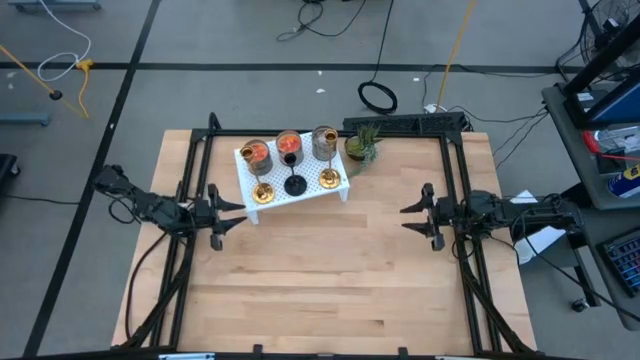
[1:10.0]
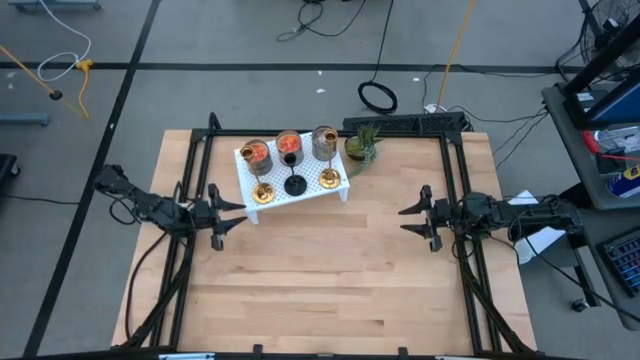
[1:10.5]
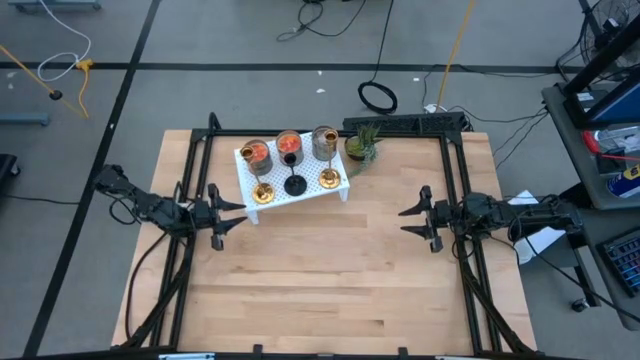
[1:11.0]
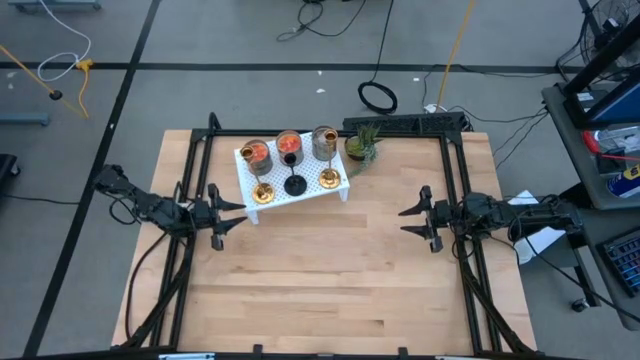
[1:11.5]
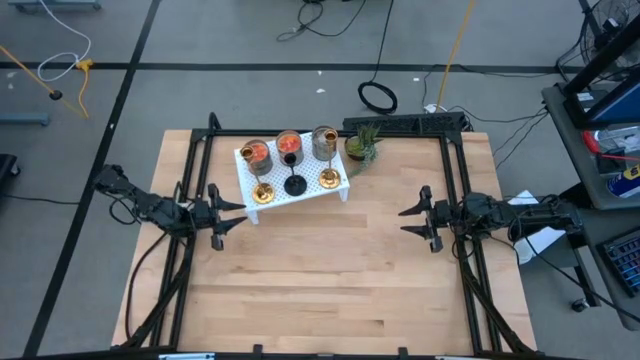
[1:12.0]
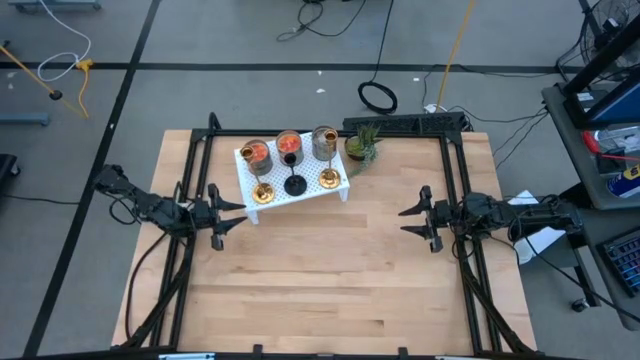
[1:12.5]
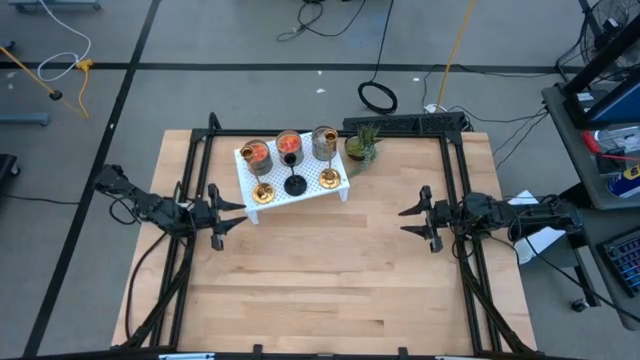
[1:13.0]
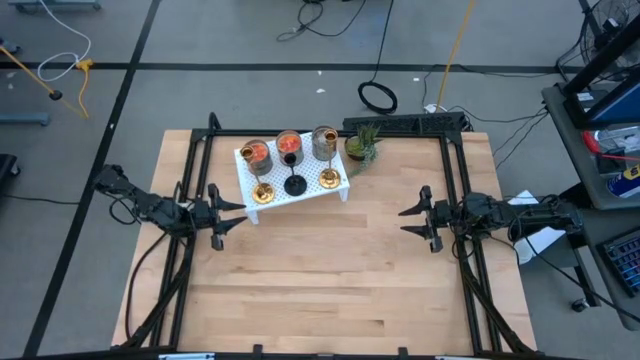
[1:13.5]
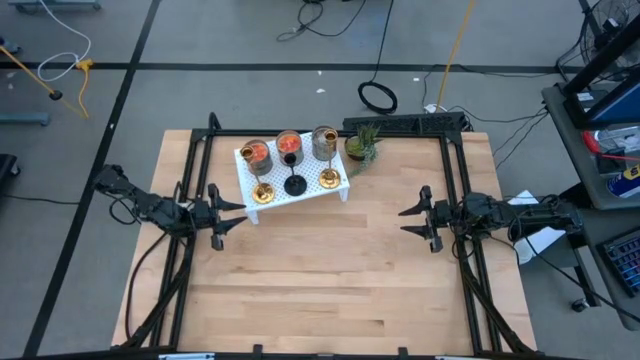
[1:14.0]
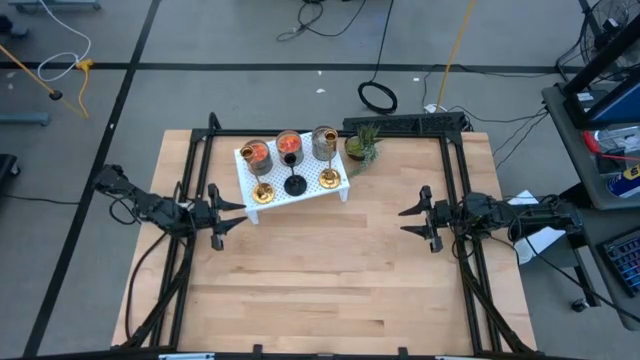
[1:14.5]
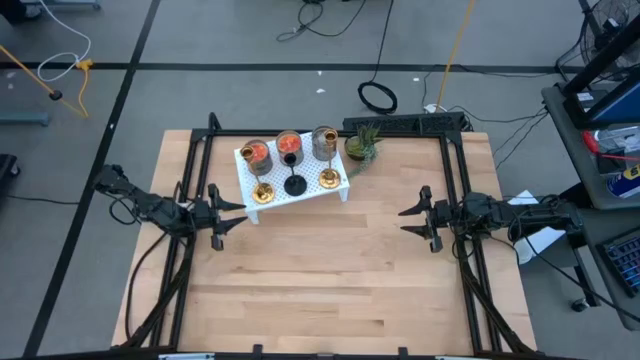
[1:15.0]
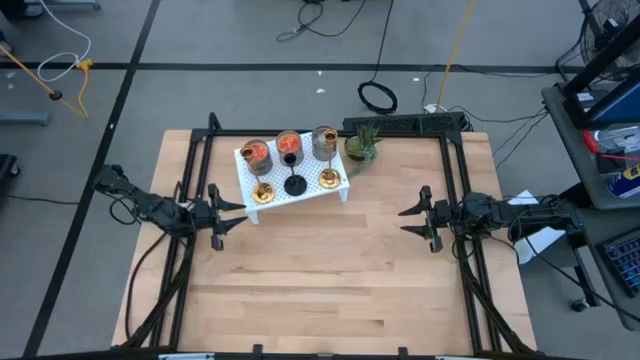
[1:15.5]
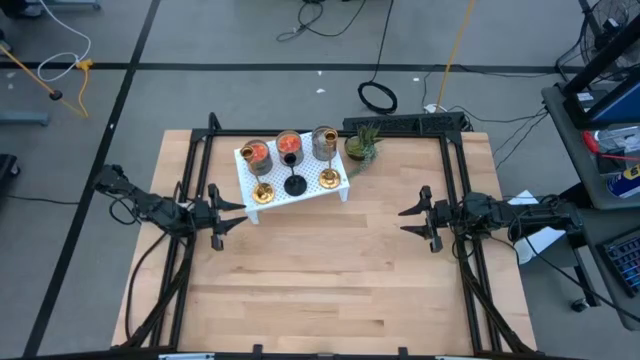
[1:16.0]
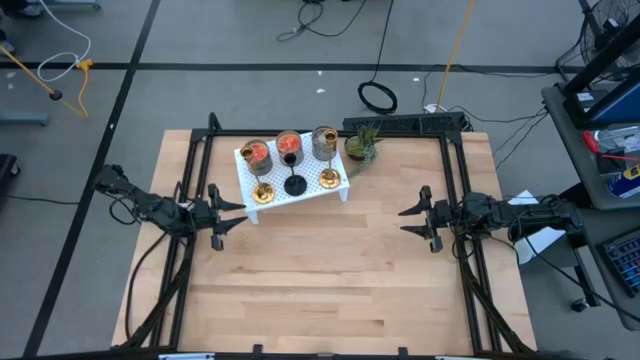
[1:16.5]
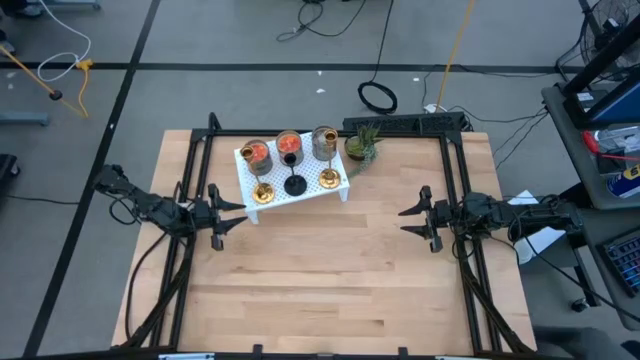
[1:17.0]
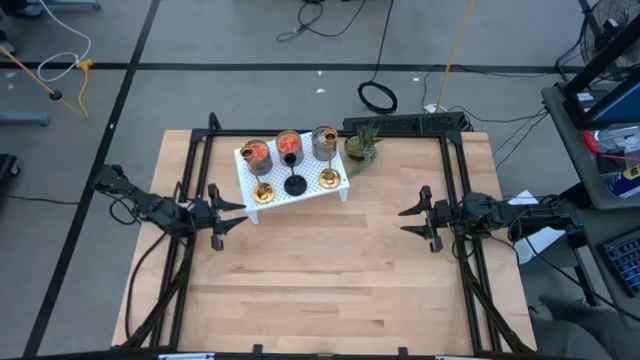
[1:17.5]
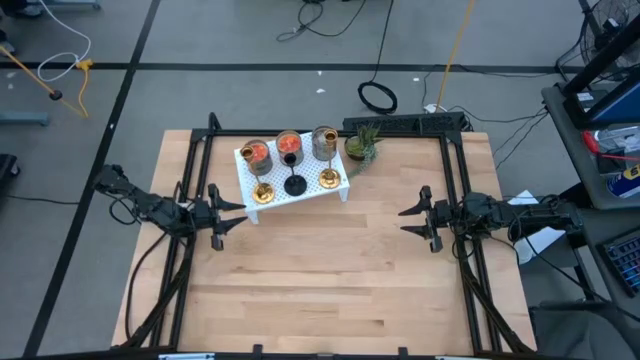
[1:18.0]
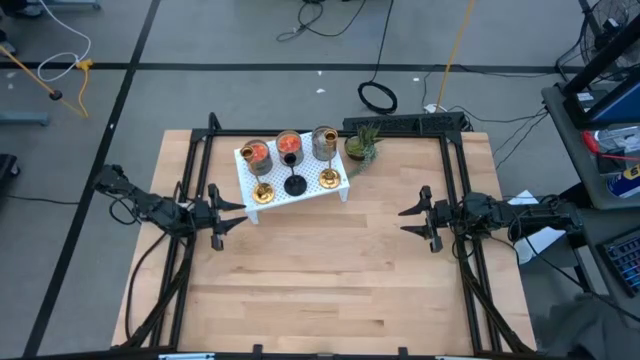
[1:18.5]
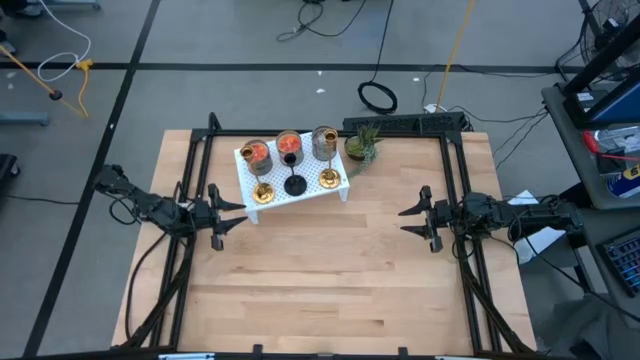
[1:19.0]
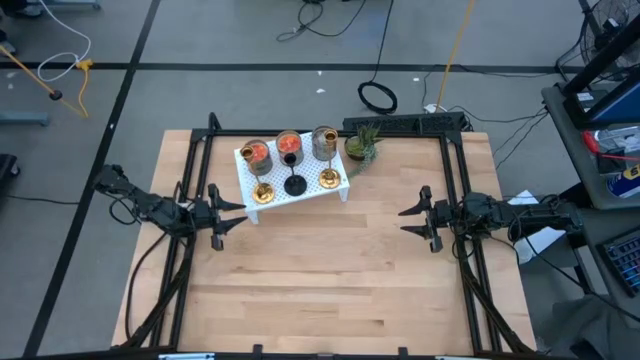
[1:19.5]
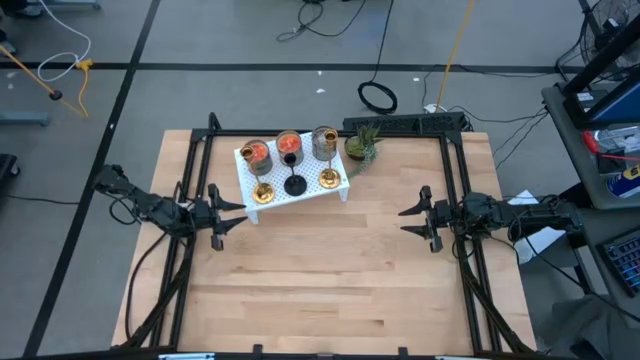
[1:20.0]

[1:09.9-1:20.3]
Task: Pick & Place candle stick holders
Return to Home Position

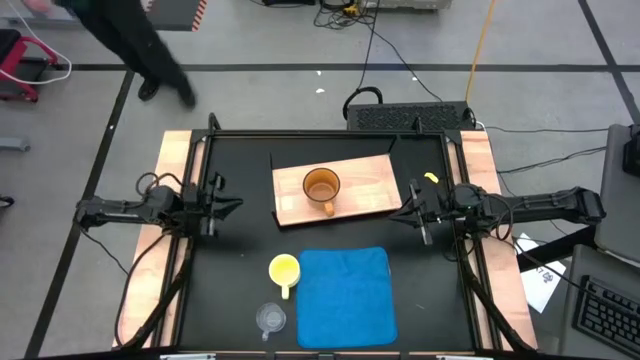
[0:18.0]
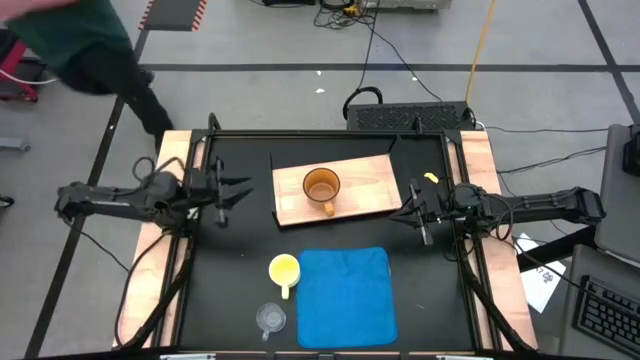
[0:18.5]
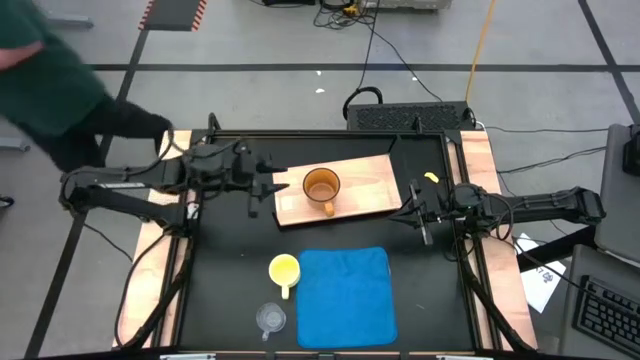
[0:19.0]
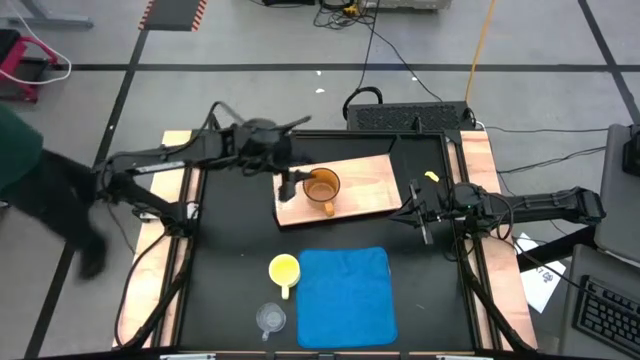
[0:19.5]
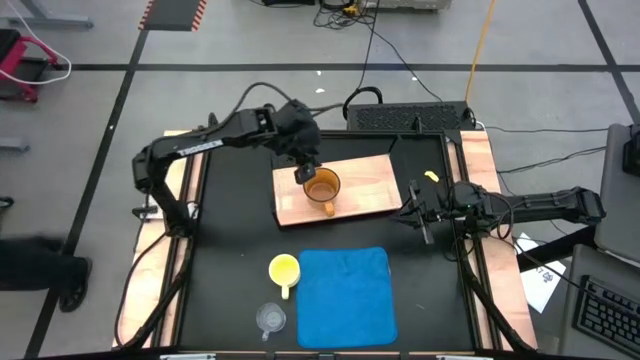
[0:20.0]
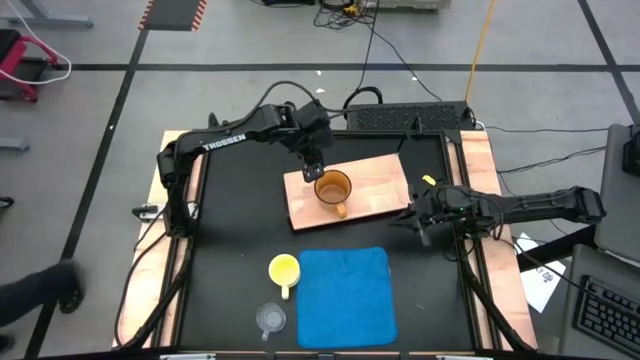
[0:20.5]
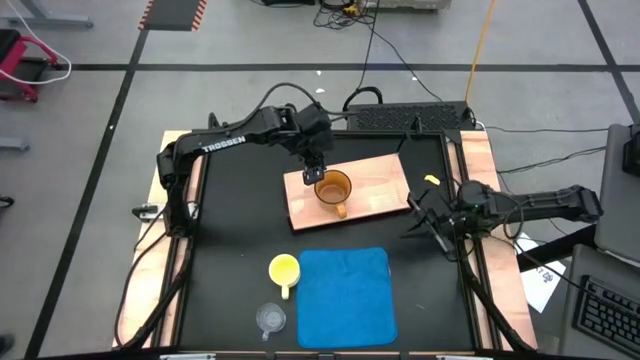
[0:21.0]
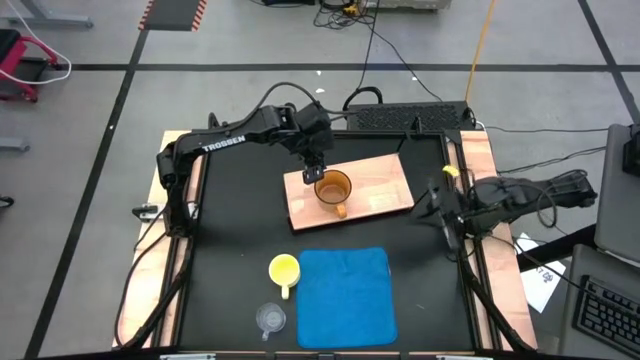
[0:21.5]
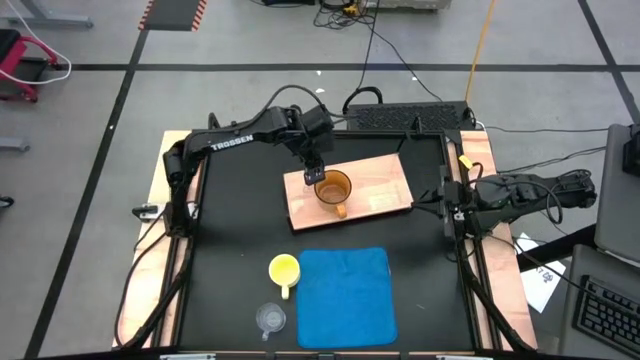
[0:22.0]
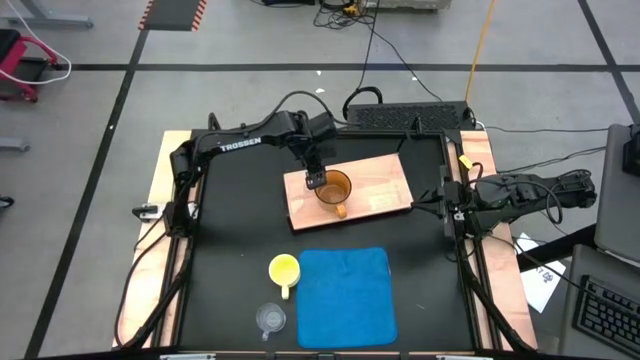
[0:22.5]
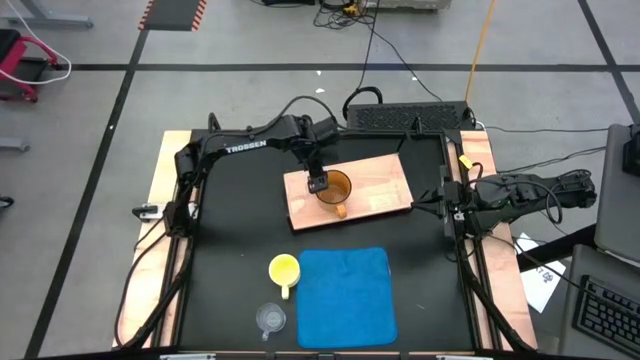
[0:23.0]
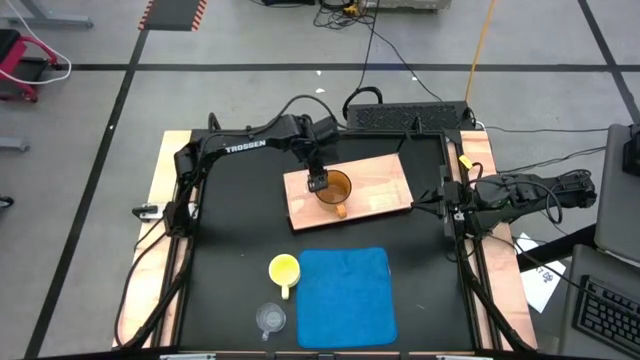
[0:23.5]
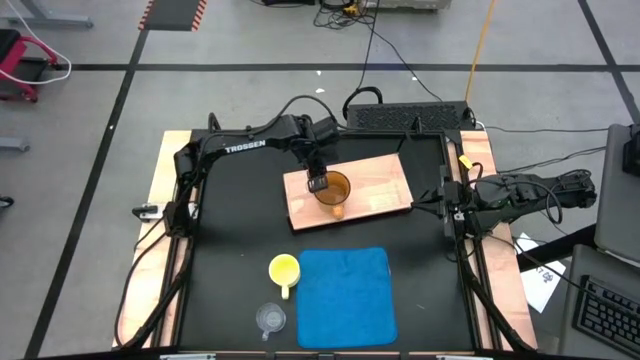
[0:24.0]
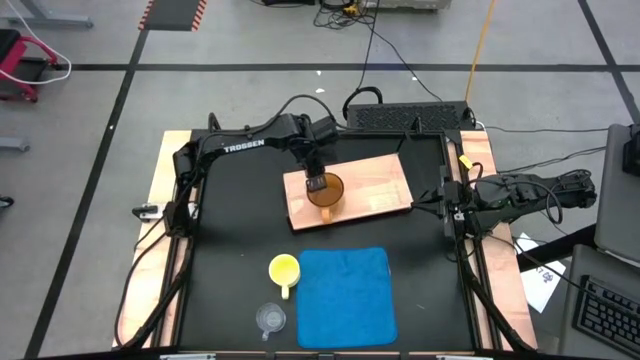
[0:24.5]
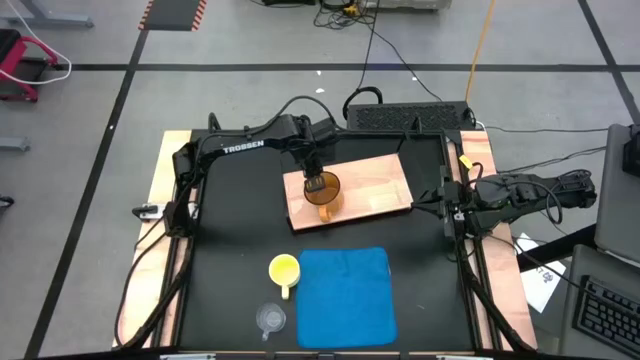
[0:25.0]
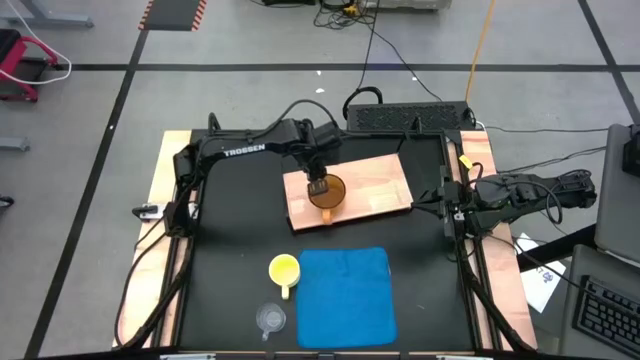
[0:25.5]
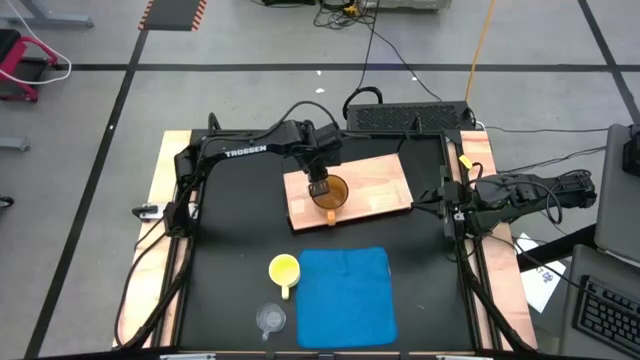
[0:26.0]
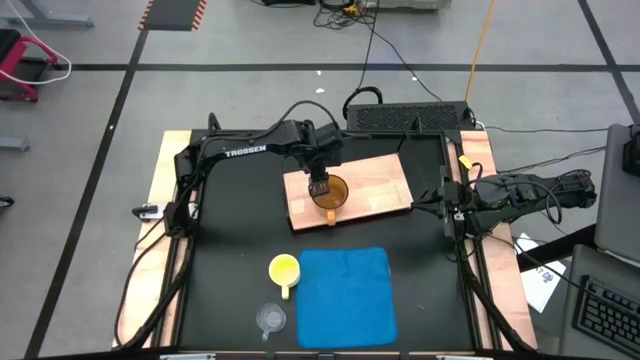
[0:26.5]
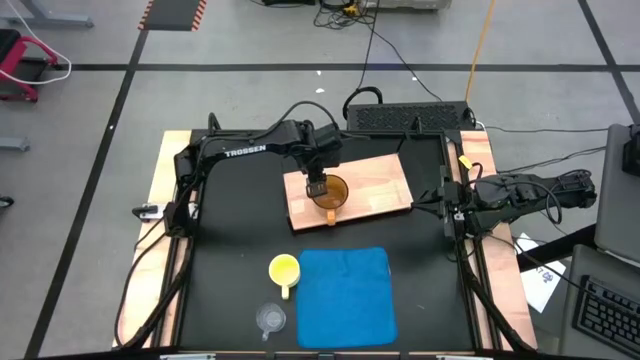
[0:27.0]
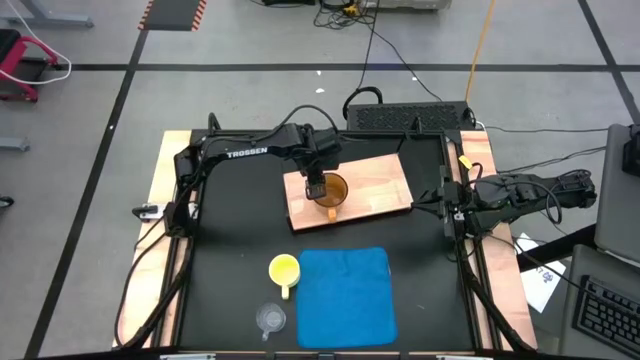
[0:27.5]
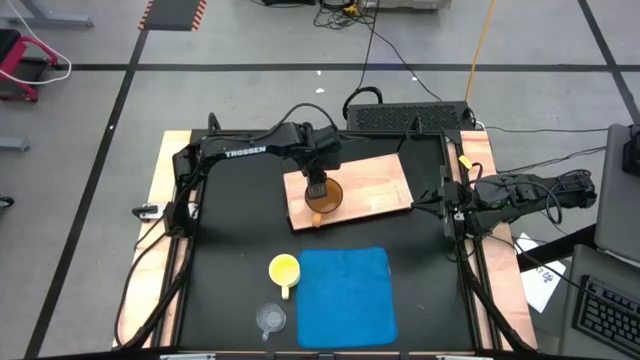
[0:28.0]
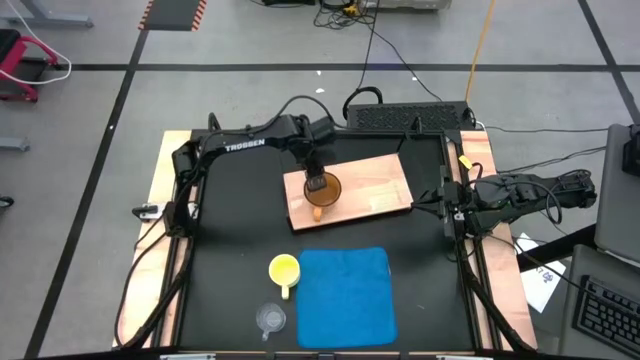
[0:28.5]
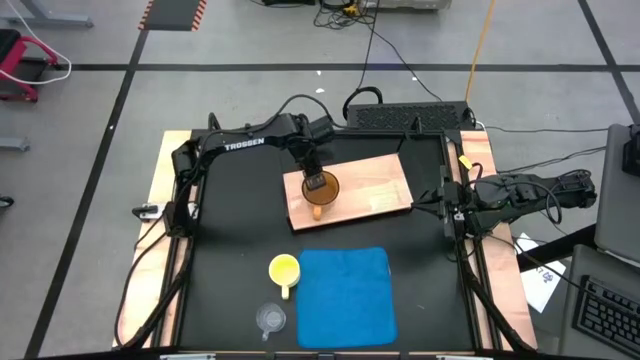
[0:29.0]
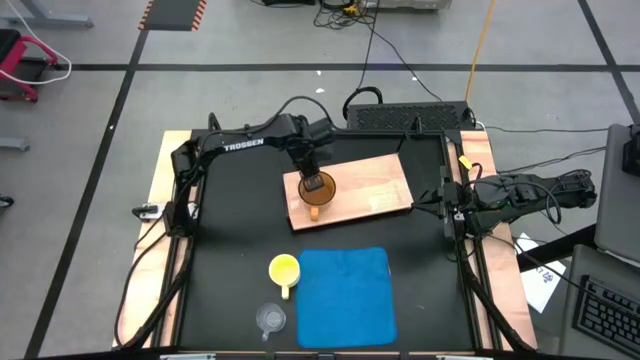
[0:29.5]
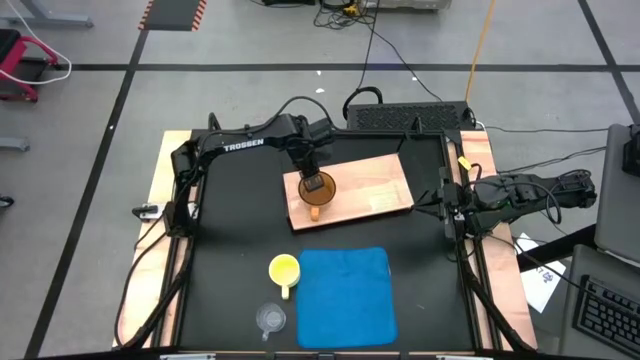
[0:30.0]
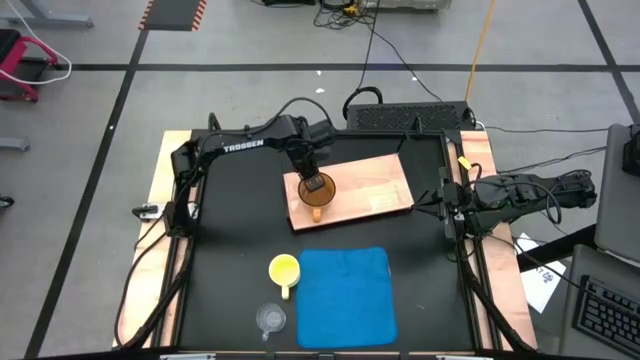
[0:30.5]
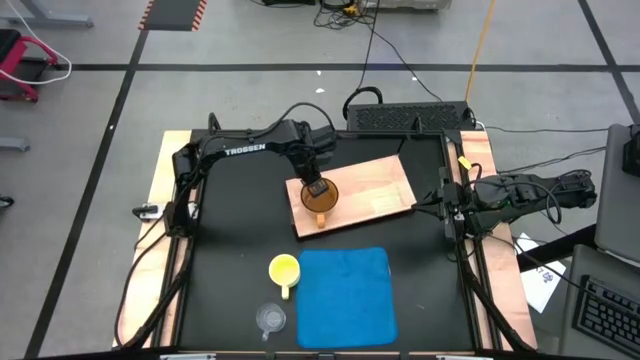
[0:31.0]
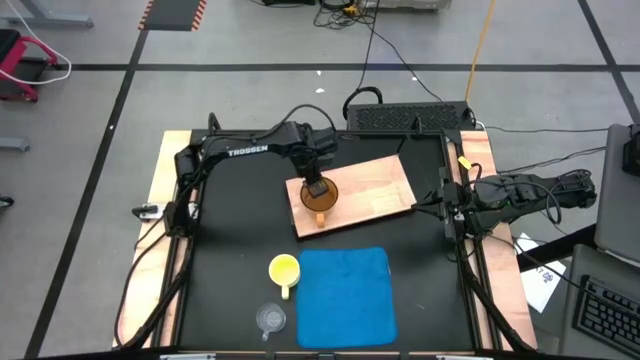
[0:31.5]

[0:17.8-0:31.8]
Task: Stack small to large cups/mugs on shelf
Put the orange mug on the shelf
